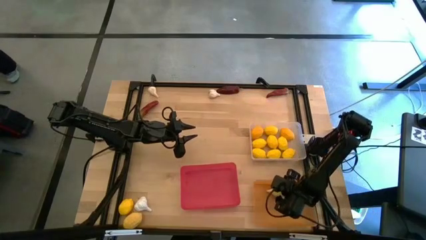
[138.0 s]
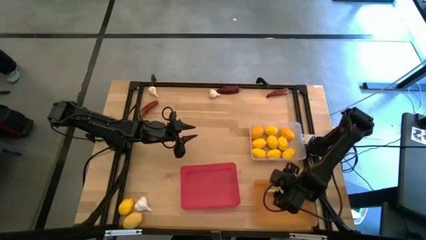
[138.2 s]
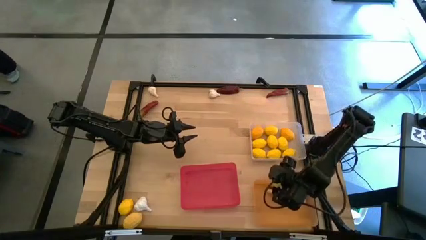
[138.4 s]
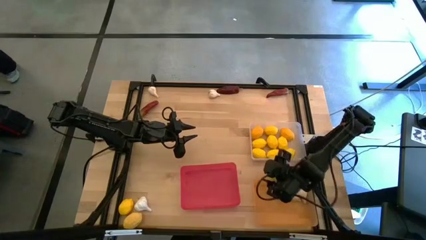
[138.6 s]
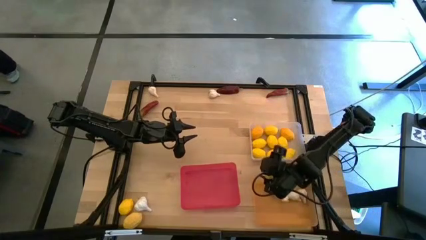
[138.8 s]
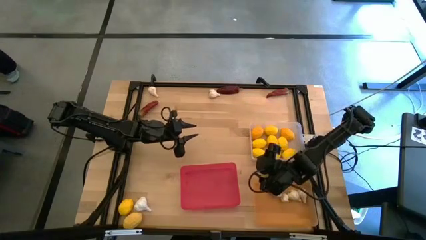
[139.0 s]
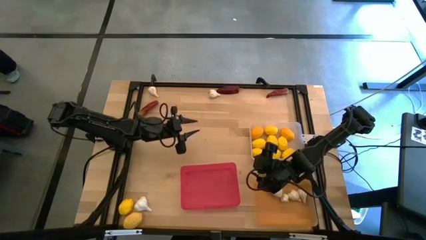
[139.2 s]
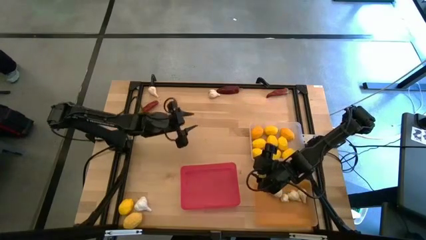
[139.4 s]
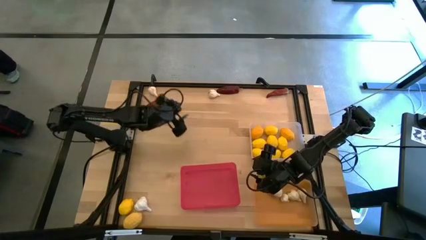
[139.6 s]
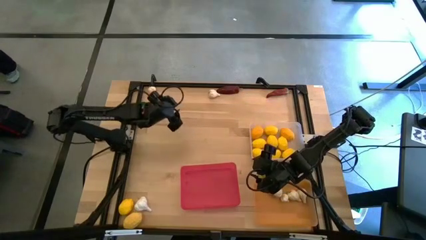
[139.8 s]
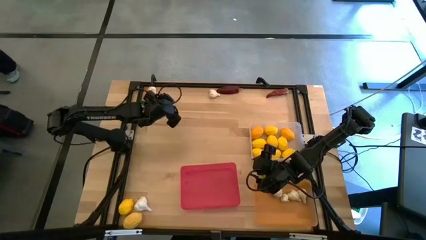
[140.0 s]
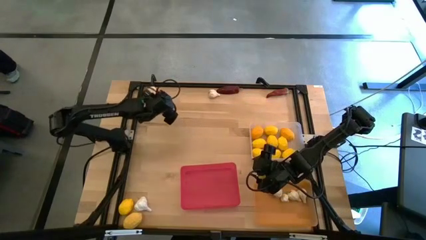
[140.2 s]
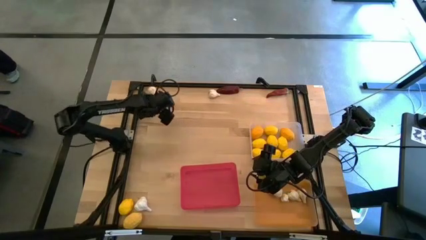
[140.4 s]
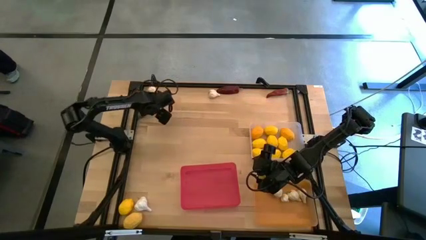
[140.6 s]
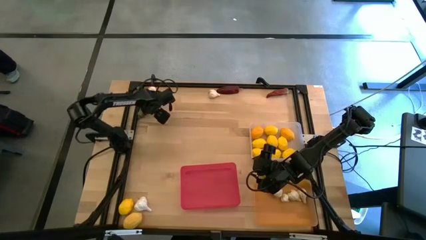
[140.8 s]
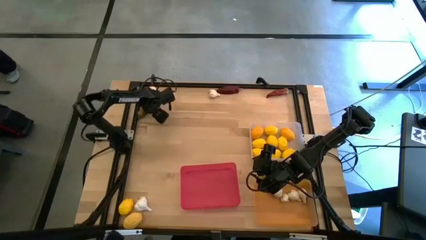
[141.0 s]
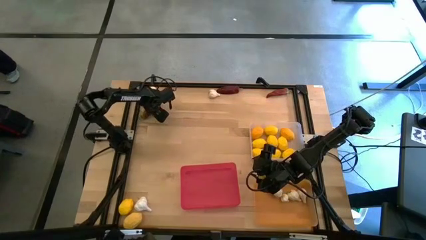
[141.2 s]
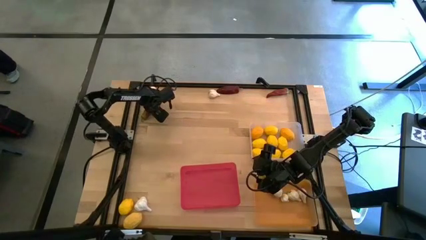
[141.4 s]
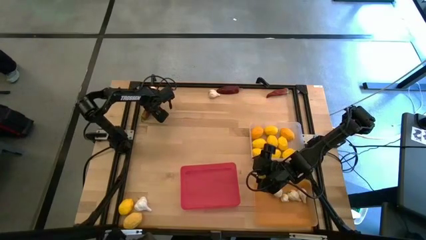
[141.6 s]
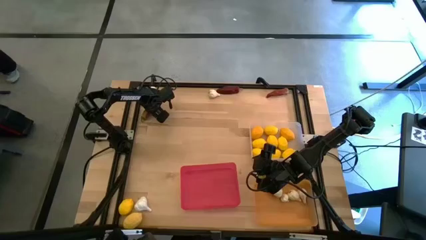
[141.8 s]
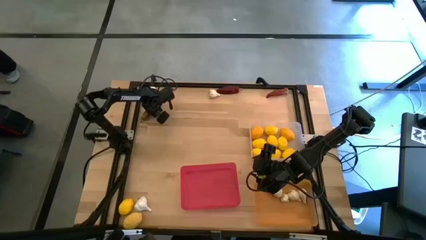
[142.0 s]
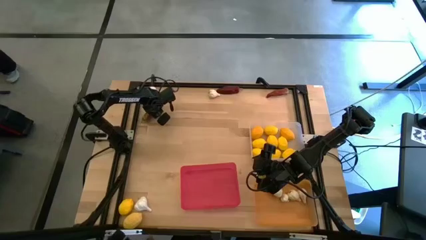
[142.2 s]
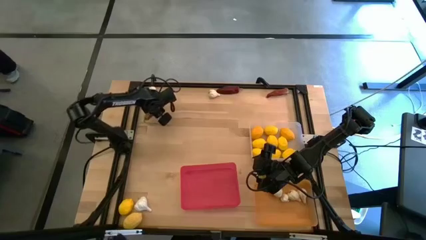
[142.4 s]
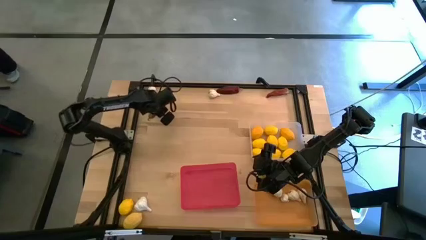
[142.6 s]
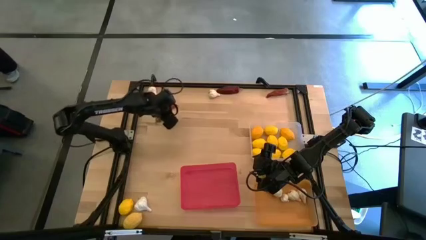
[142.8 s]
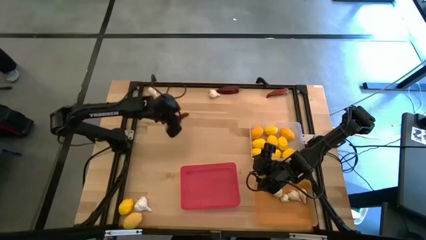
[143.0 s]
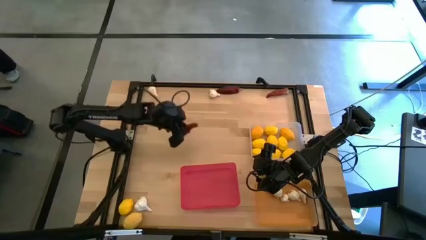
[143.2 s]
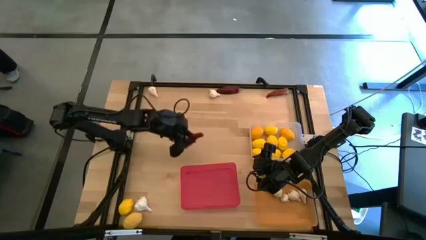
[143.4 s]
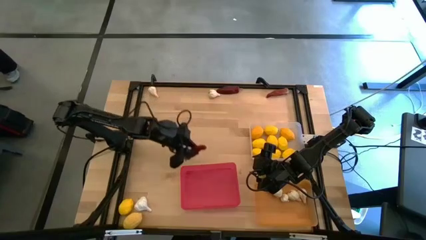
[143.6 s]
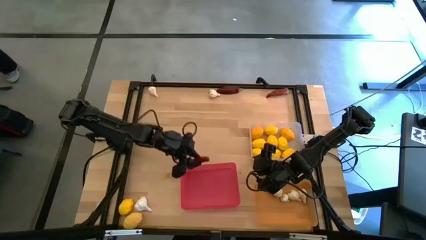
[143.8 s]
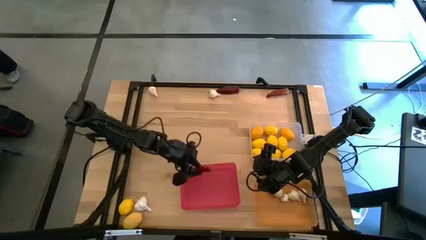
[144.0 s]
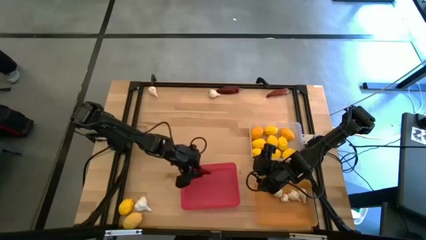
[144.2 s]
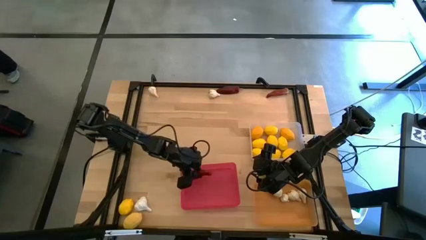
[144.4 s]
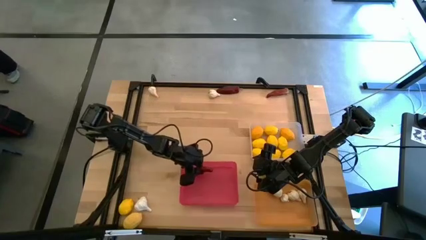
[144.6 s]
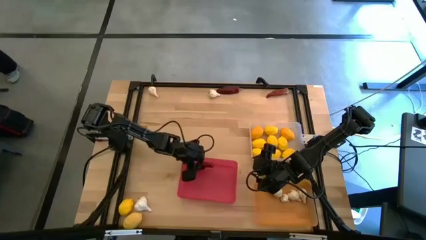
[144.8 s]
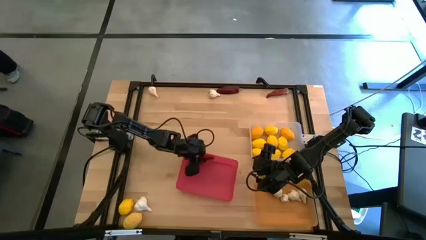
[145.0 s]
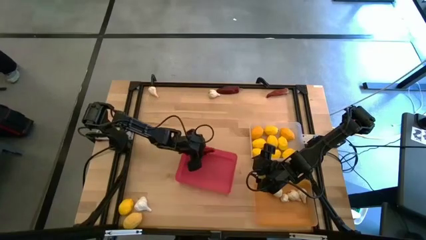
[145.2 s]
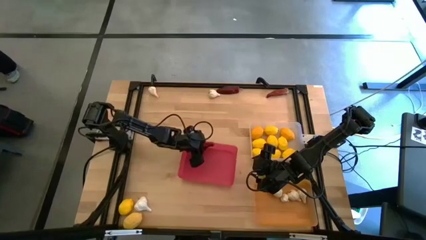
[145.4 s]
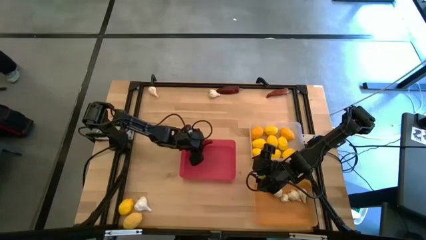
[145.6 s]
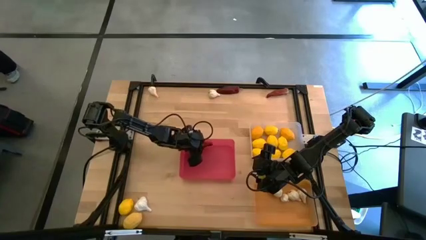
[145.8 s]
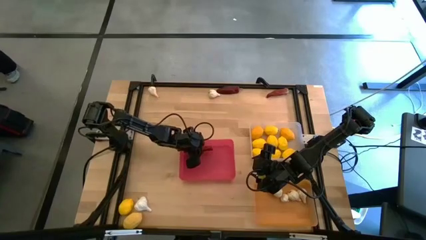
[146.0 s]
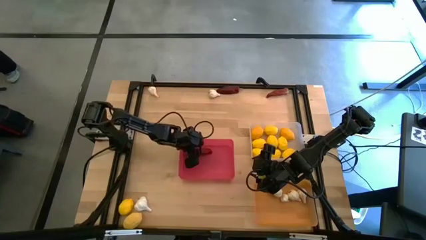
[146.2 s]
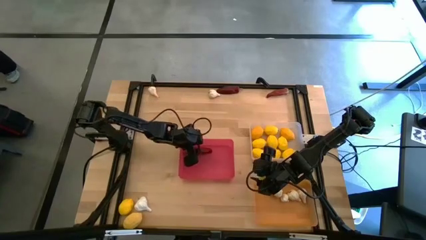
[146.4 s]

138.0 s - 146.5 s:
Task: Sort produce into baskets
Put the red chili pepper into the red bin

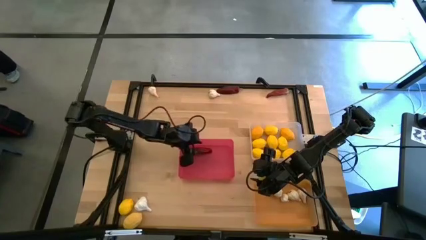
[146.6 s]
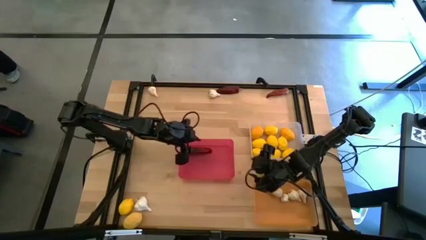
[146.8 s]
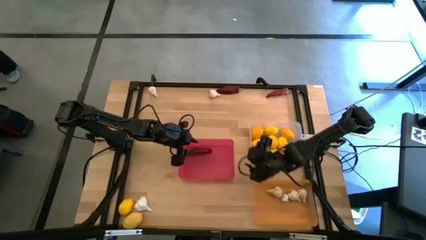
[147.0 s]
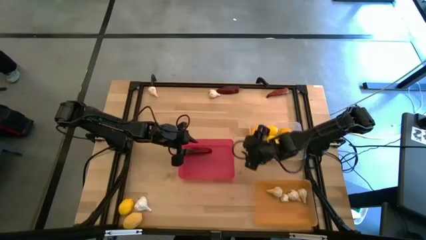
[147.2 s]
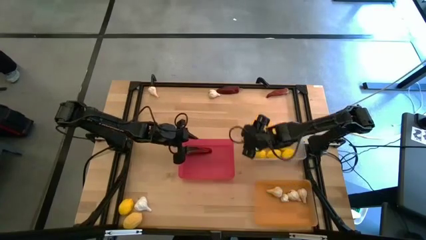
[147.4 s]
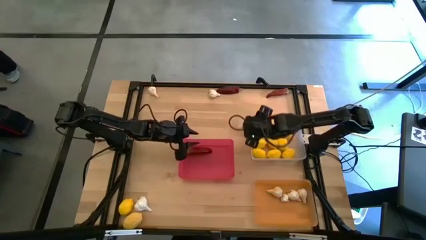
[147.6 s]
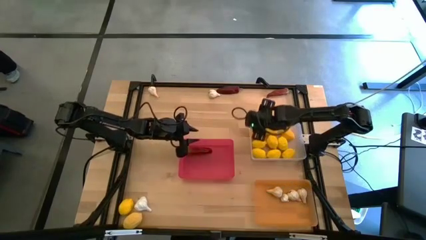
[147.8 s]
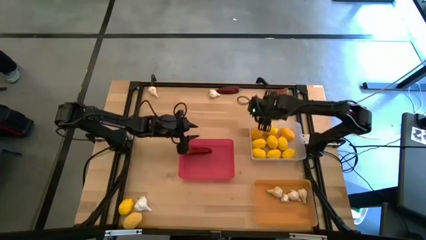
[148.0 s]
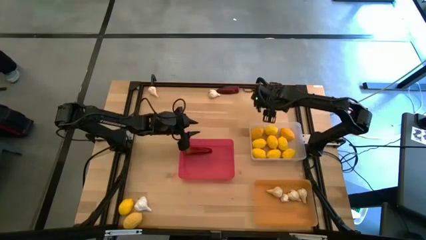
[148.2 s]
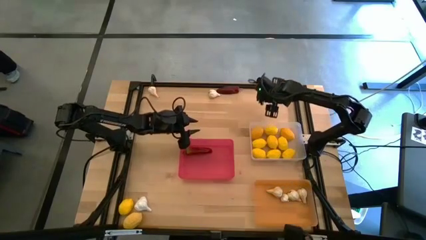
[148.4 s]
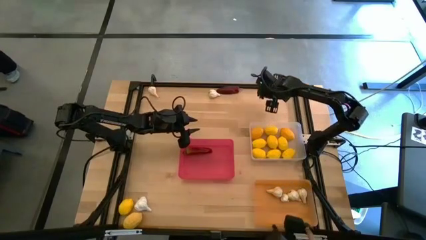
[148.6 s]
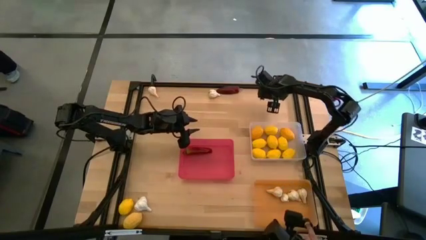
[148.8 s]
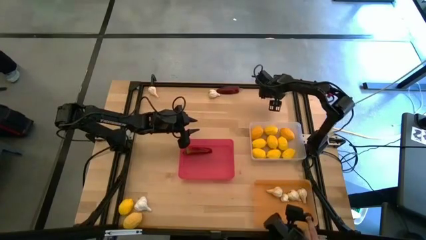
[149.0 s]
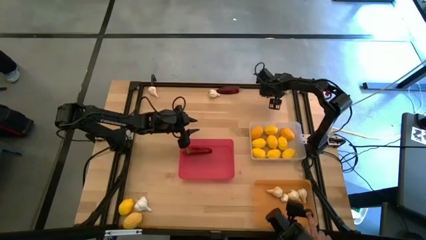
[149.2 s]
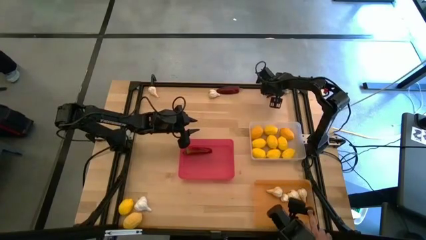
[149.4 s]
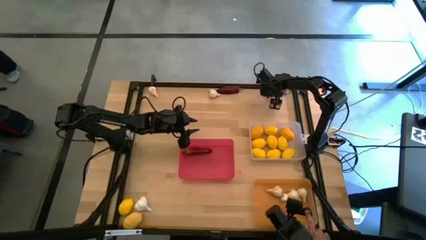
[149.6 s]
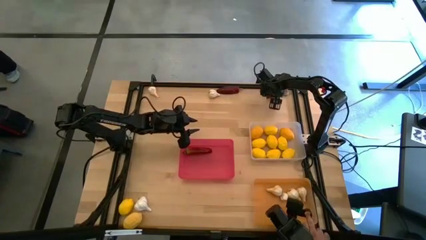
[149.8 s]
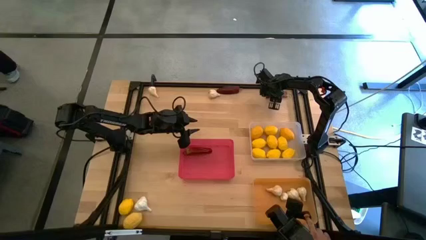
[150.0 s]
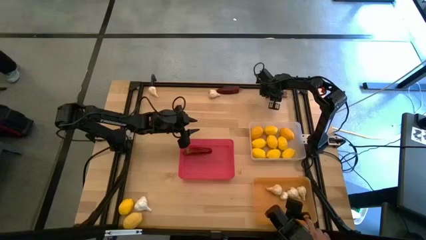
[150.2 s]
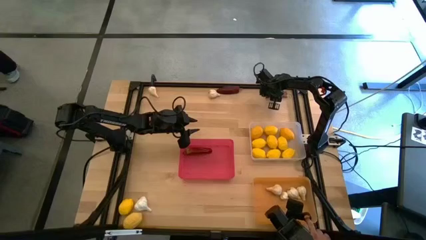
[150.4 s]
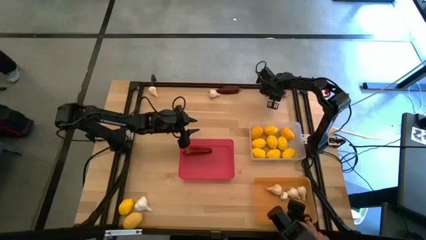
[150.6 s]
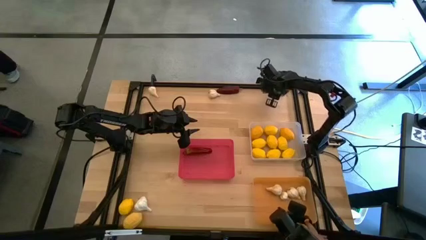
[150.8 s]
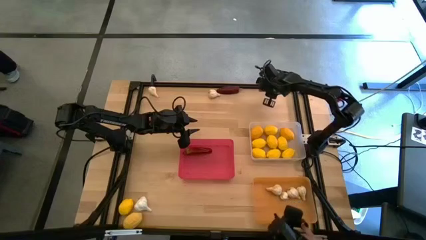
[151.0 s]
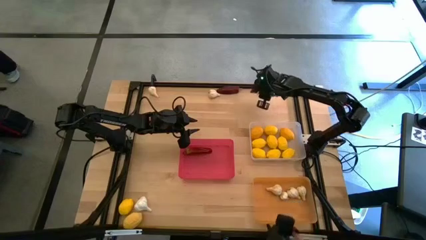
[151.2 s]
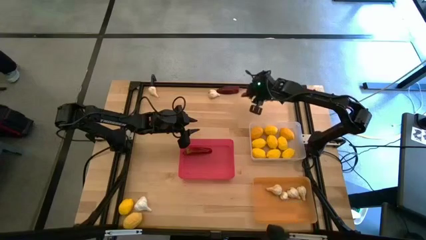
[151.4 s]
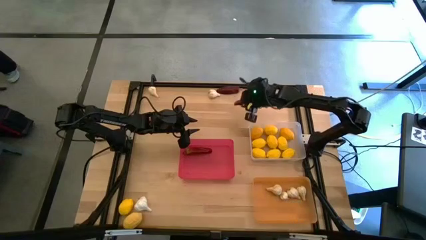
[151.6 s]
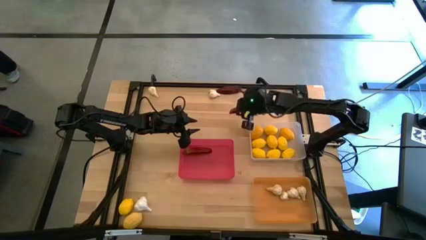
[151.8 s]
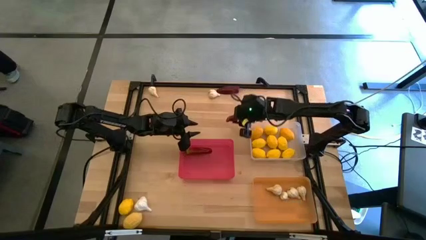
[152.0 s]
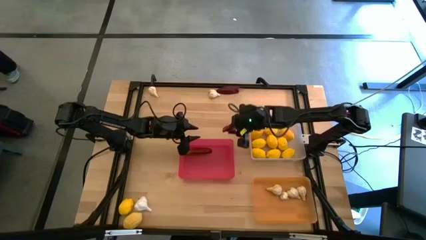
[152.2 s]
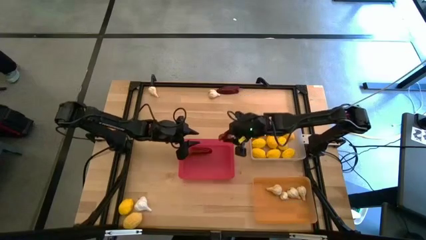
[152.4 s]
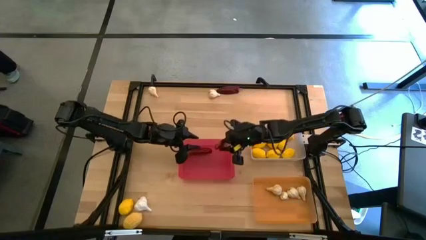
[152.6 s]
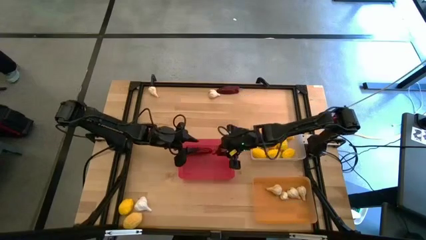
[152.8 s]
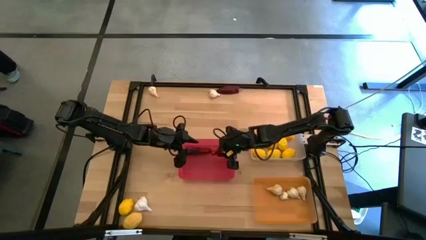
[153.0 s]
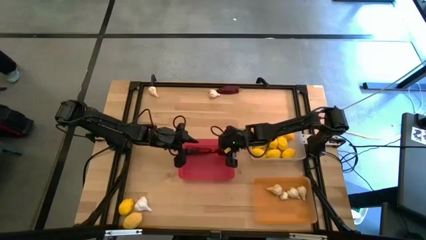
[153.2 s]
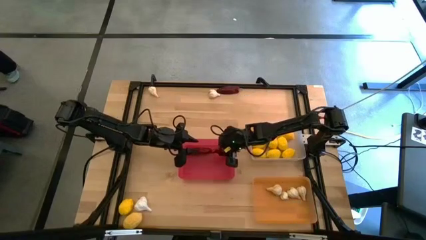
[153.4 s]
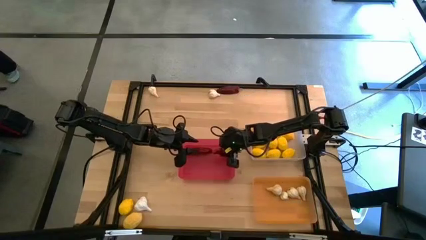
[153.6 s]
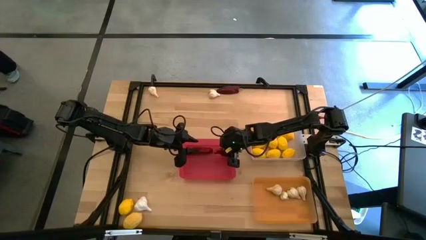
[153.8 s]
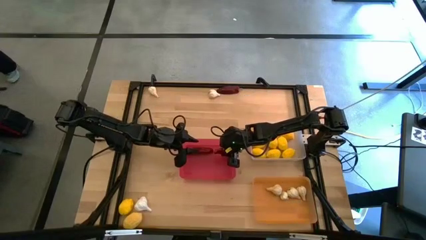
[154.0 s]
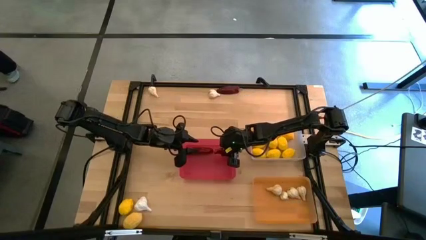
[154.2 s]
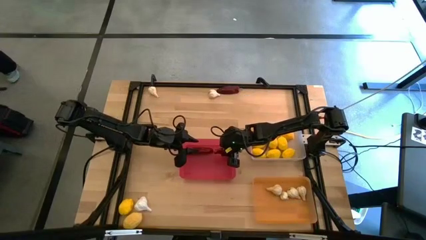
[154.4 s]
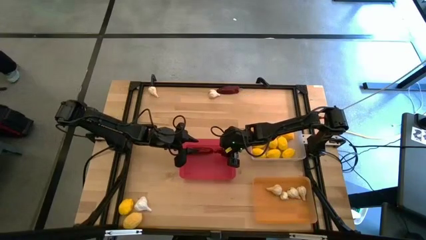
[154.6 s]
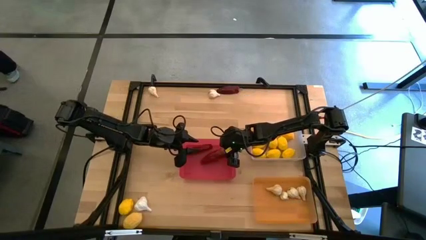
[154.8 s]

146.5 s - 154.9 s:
Put the red chili pepper into the red bin
